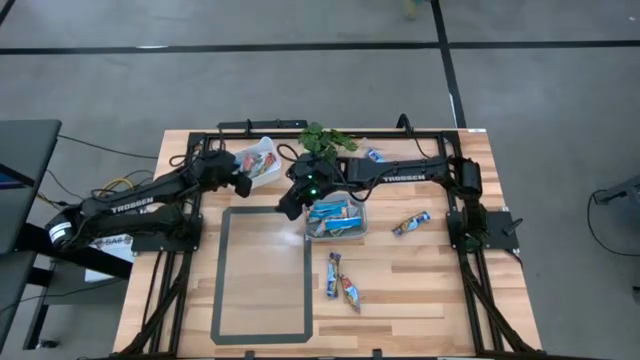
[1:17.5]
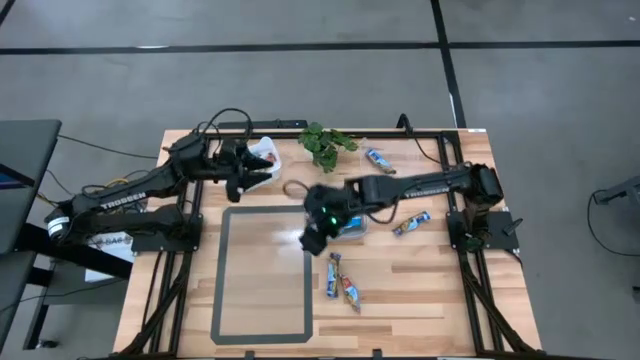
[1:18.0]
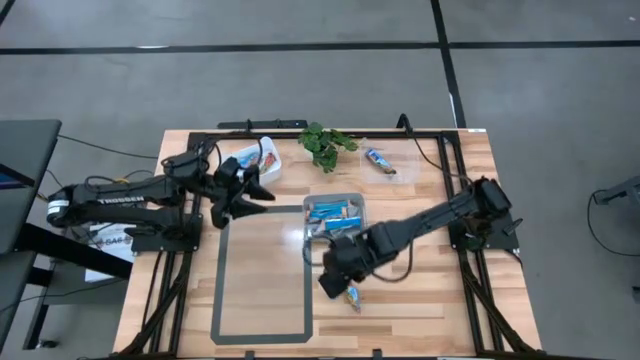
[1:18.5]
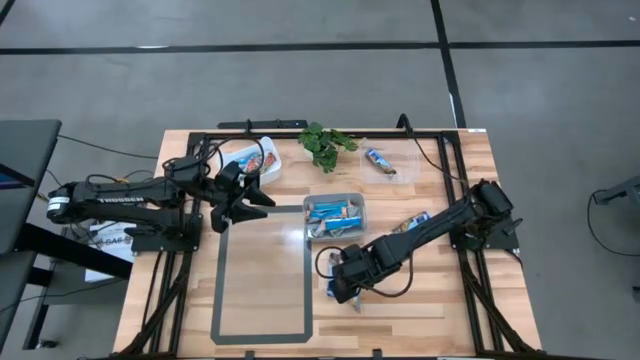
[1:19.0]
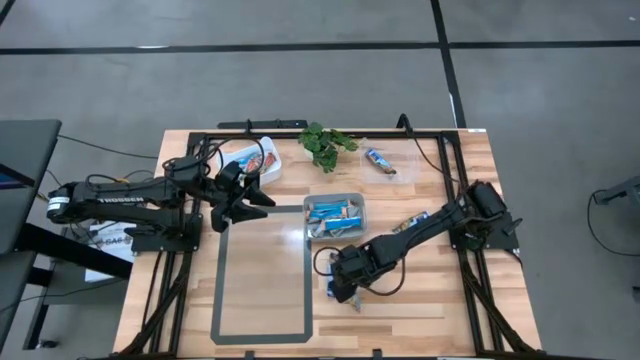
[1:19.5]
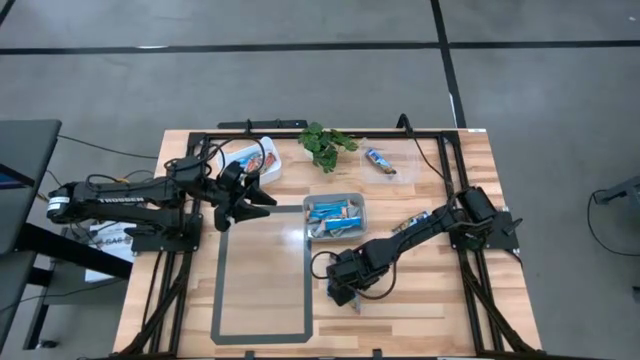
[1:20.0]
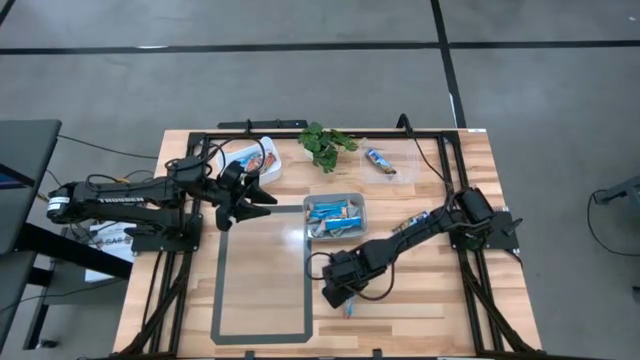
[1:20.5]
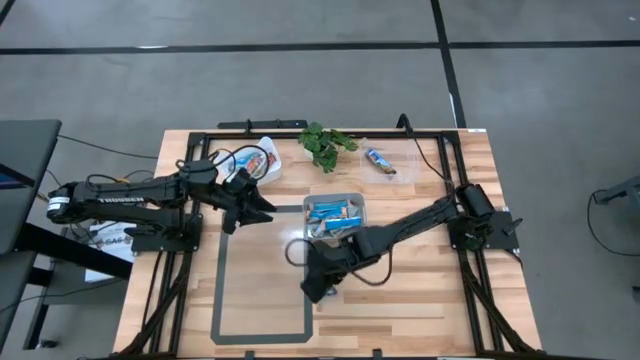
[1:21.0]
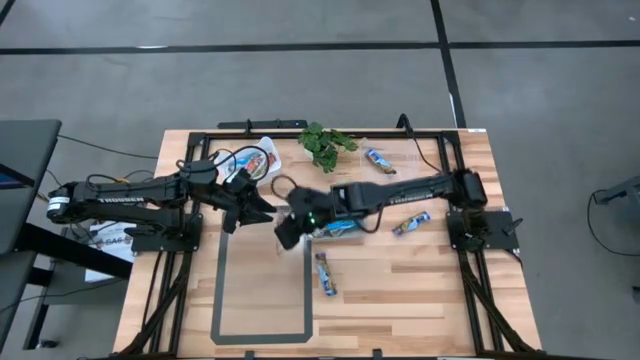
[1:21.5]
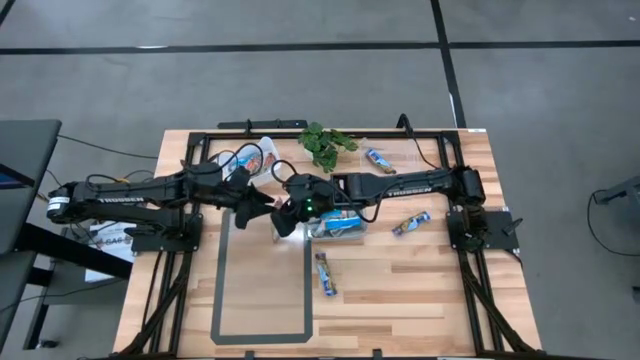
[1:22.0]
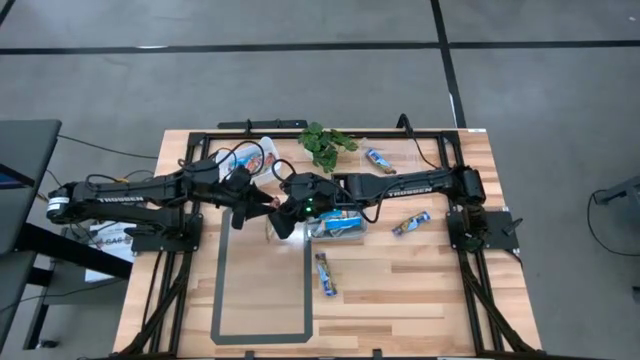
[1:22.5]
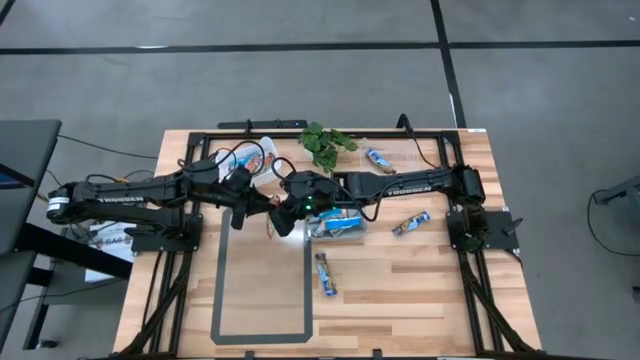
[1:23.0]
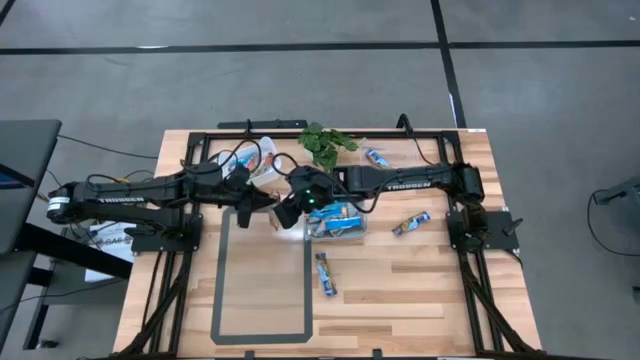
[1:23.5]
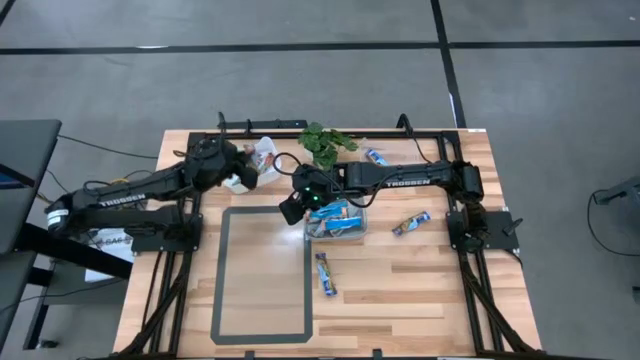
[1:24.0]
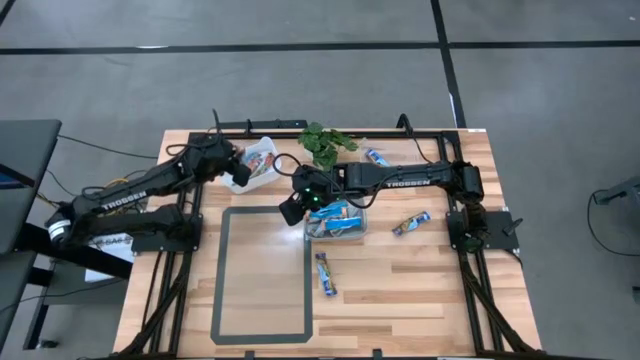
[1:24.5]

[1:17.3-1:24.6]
Task: Pick and place Granola Bars by type
Put the red granola bar into the white bin

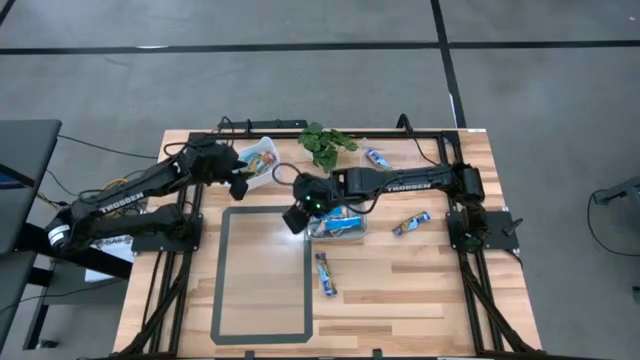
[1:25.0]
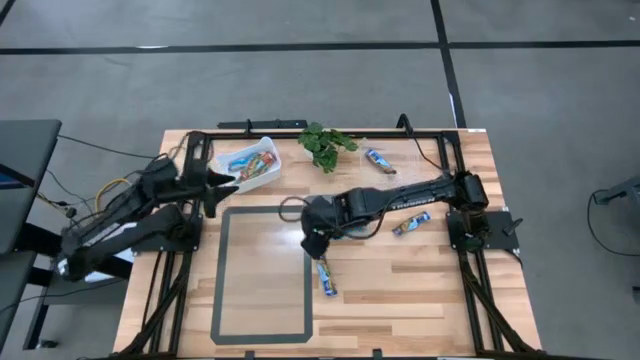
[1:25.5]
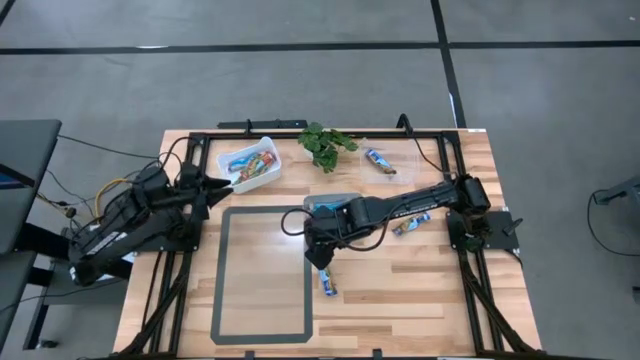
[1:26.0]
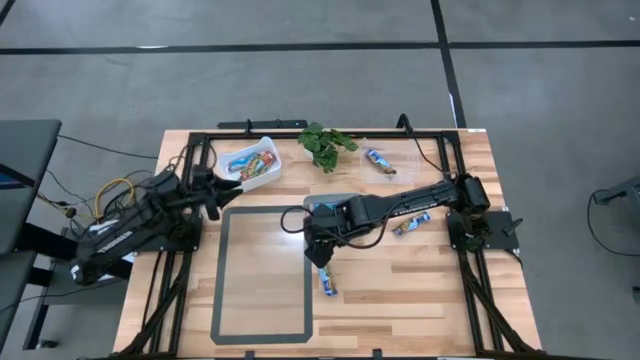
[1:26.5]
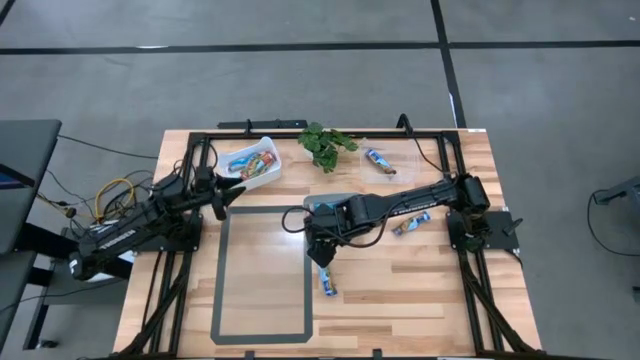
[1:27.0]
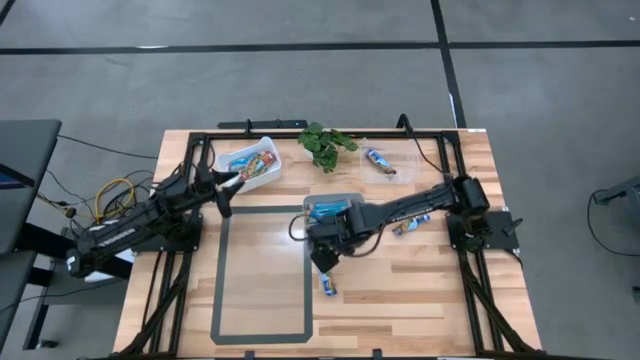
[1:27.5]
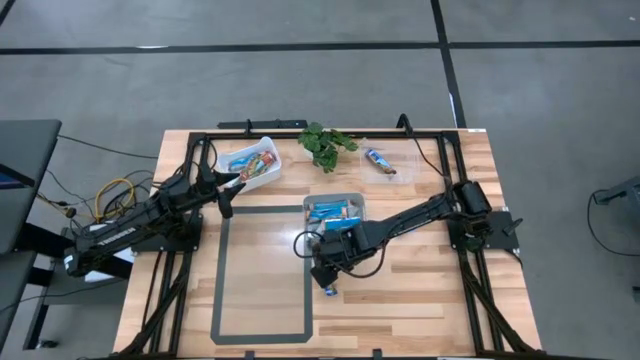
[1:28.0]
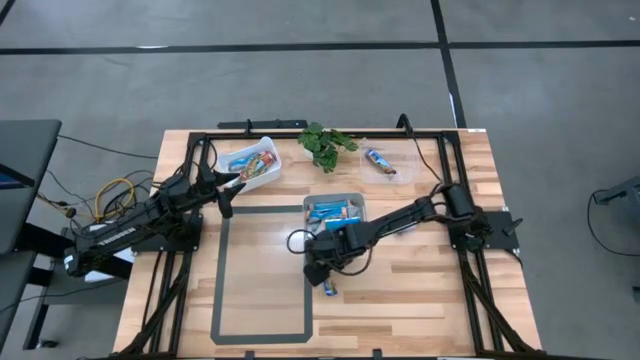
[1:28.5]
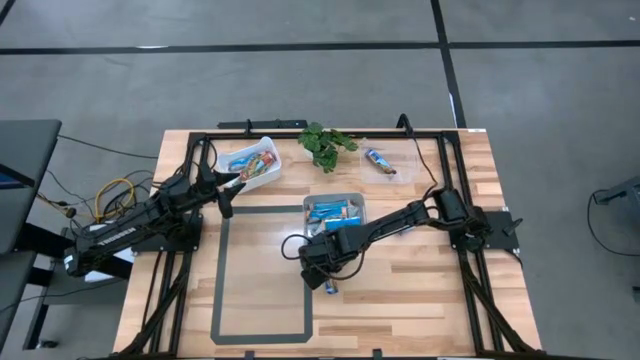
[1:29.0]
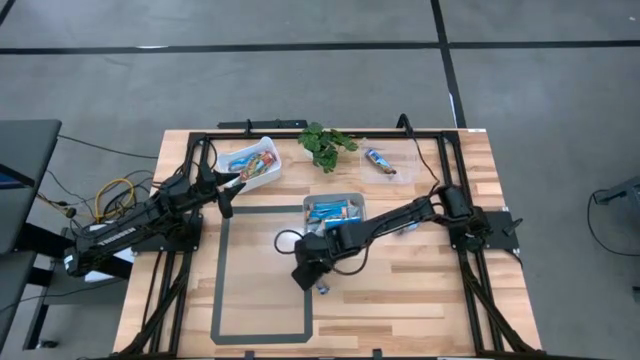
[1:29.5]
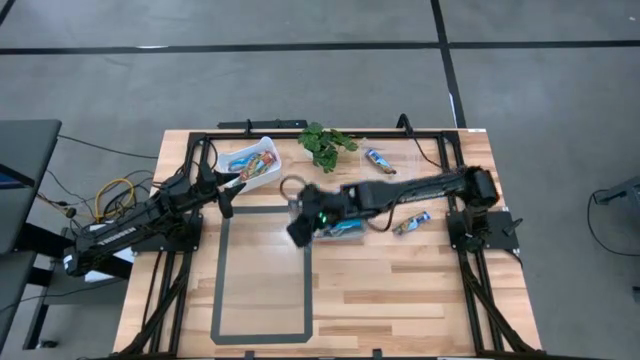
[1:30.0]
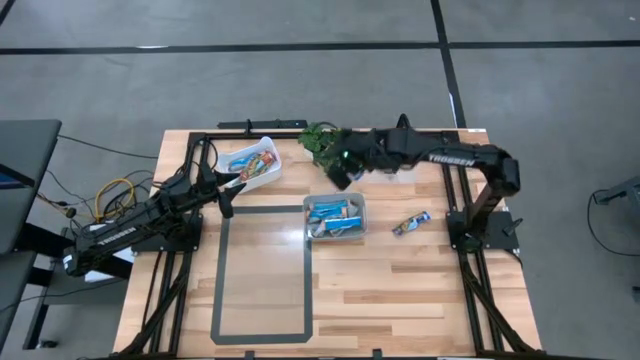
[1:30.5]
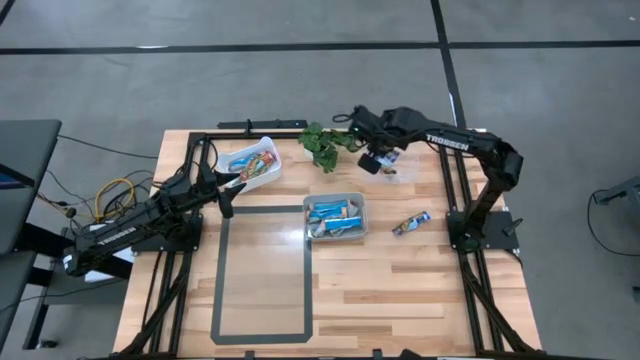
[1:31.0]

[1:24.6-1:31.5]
Put the blue granola bar into the transparent bin

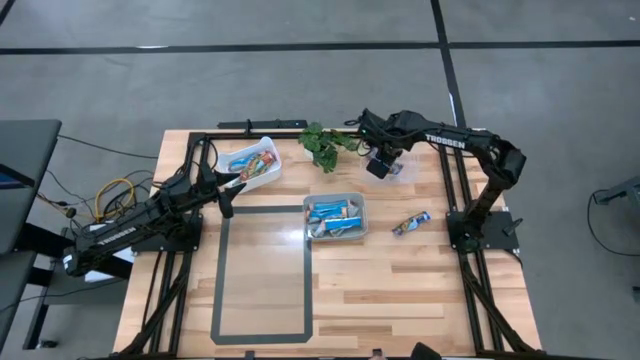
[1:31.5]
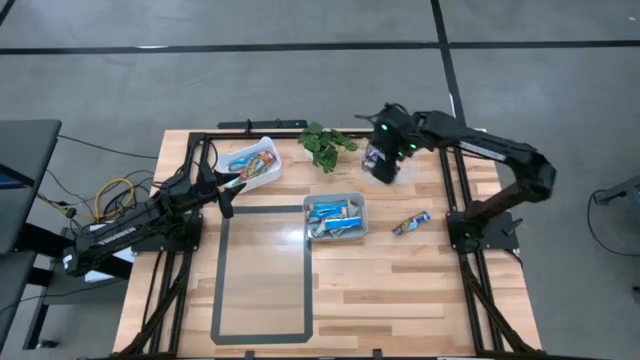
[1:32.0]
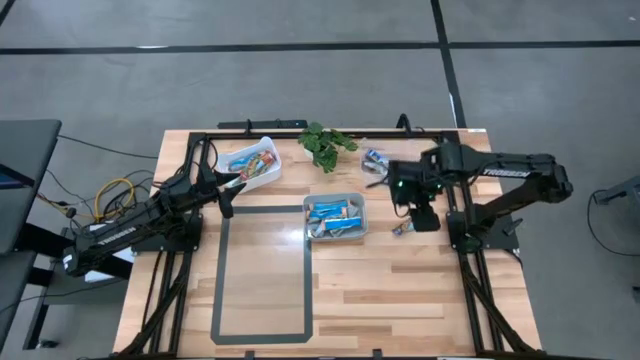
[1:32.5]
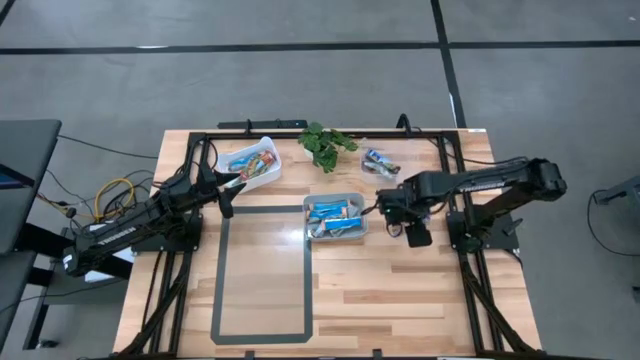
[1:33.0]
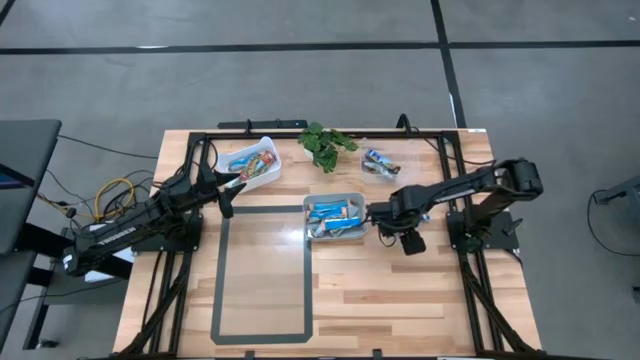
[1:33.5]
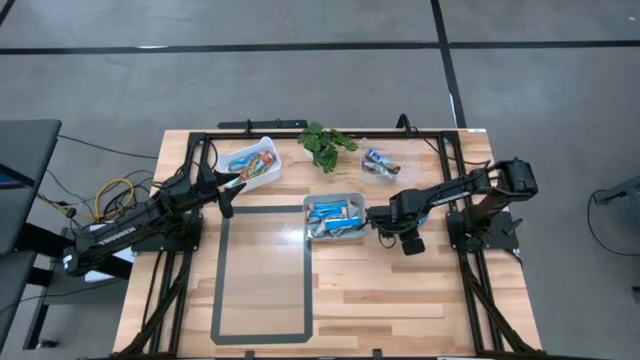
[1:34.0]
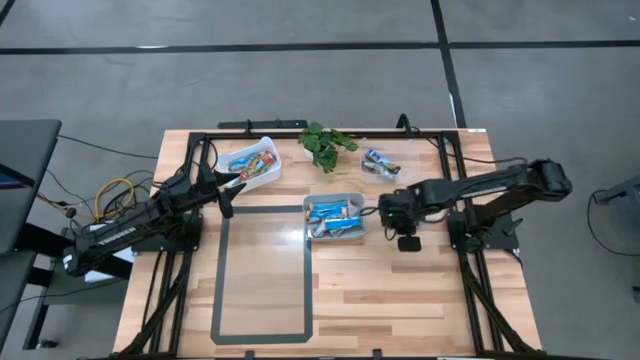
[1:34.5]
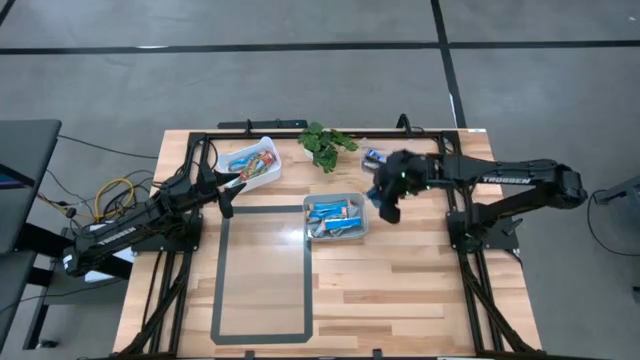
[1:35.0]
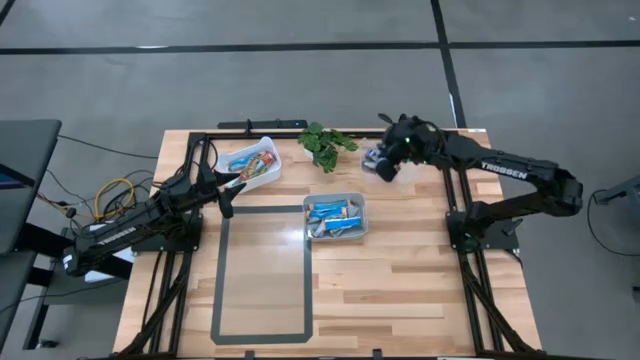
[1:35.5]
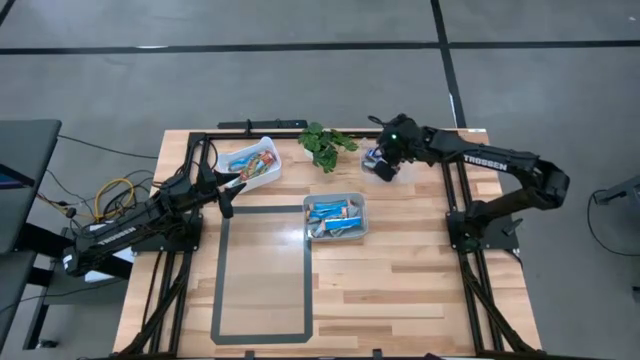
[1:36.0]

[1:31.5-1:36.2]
Put the blue granola bar into the transparent bin

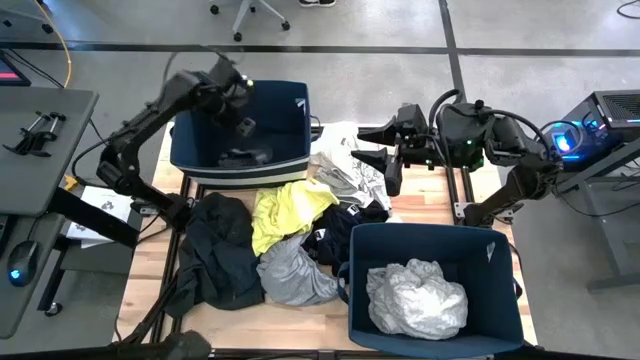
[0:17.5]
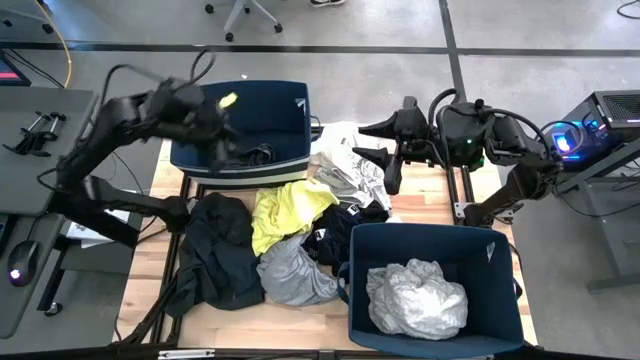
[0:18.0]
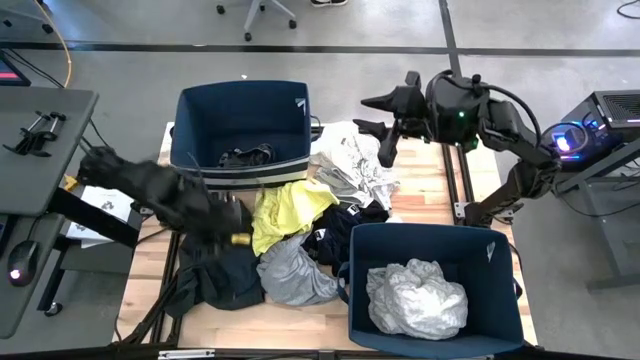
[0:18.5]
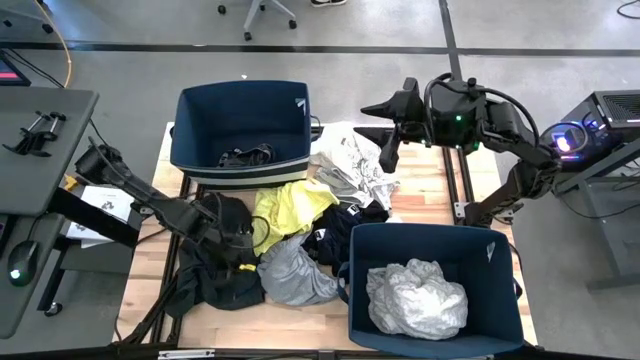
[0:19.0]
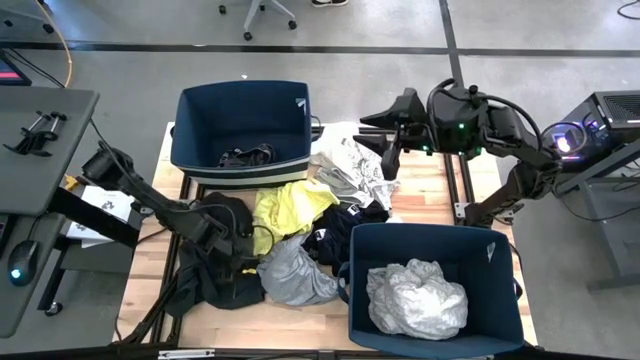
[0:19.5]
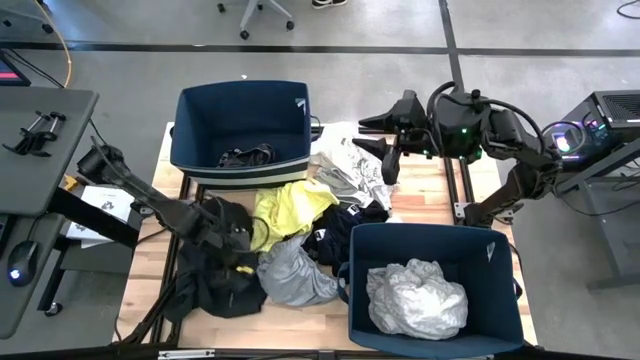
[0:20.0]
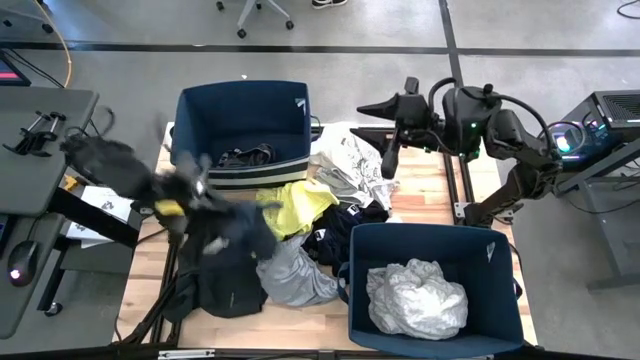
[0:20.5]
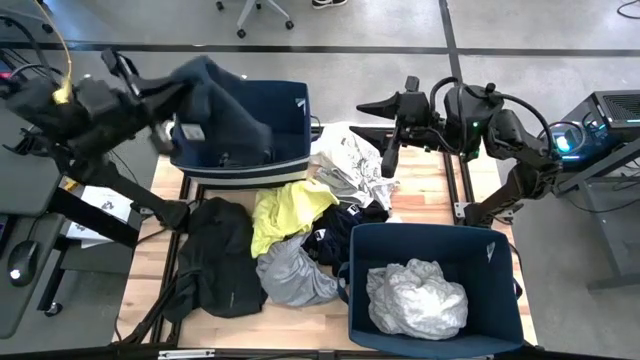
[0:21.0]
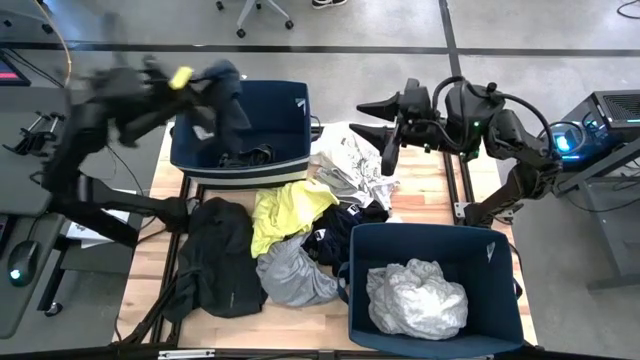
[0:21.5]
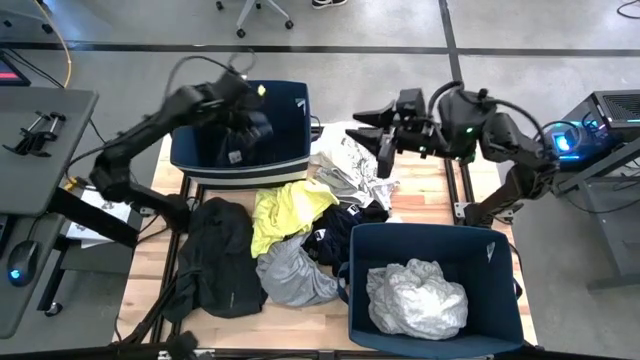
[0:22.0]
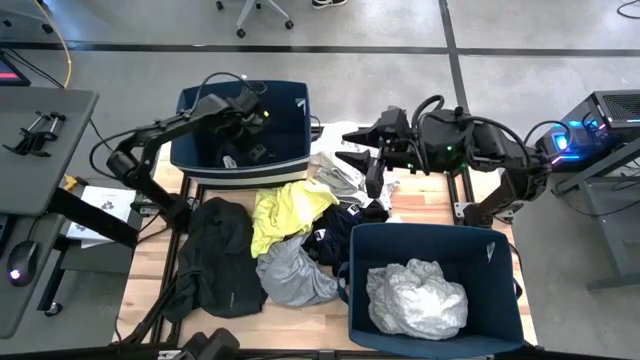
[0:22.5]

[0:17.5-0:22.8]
Task: Sort clothes
Put the blue shorts into the top blue laundry bin
